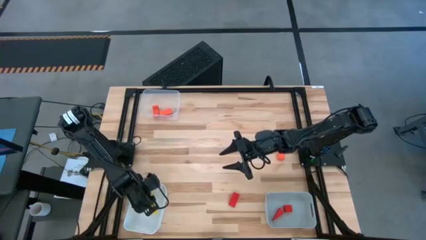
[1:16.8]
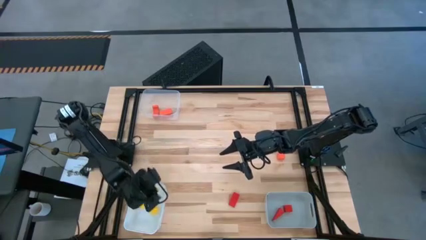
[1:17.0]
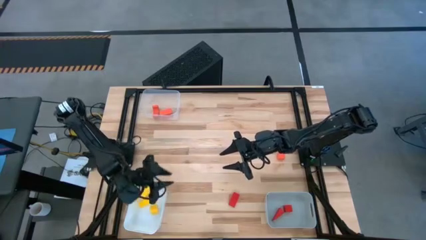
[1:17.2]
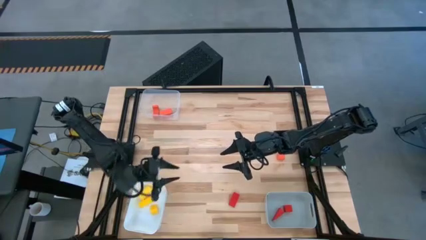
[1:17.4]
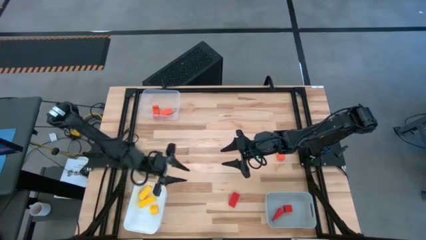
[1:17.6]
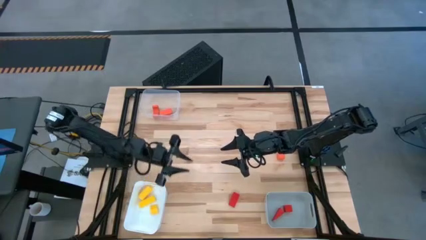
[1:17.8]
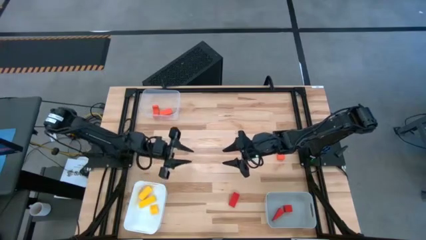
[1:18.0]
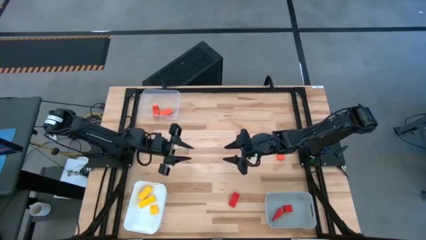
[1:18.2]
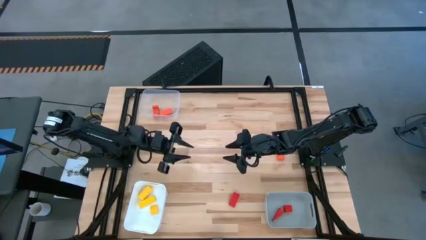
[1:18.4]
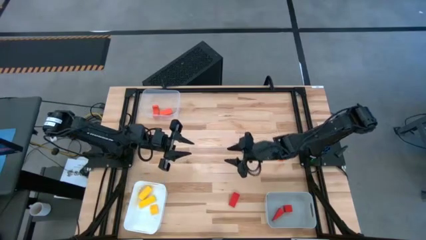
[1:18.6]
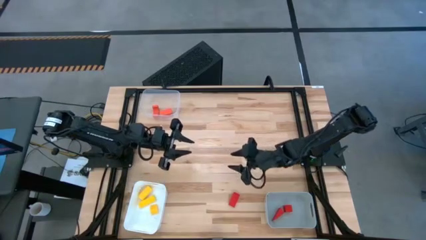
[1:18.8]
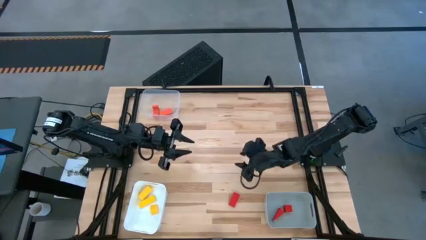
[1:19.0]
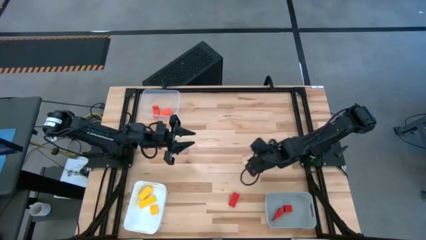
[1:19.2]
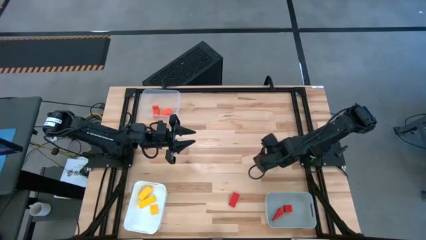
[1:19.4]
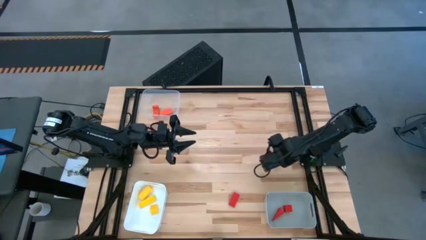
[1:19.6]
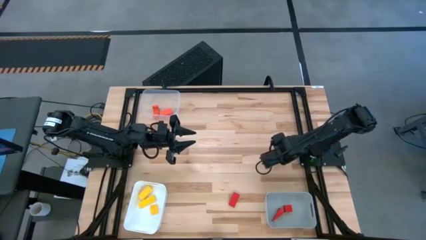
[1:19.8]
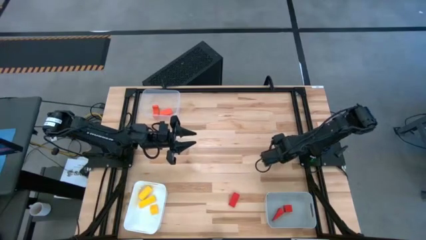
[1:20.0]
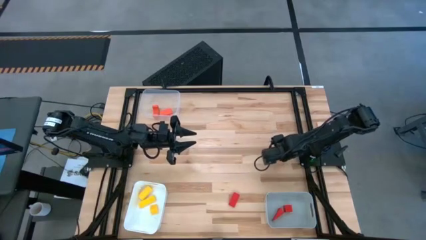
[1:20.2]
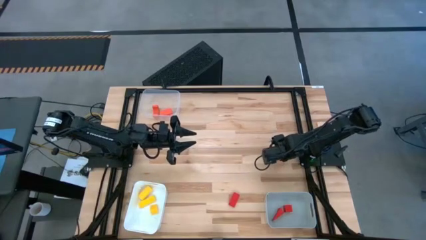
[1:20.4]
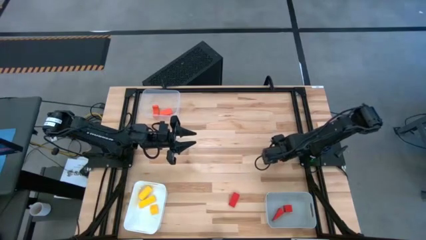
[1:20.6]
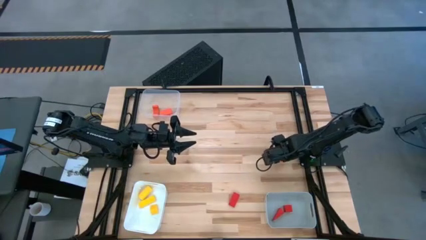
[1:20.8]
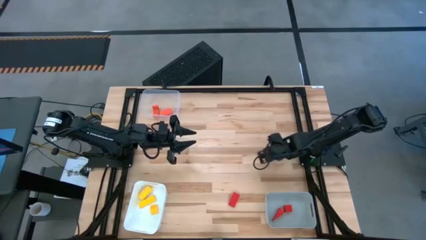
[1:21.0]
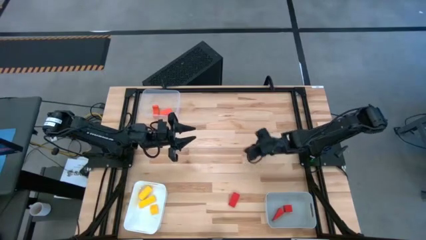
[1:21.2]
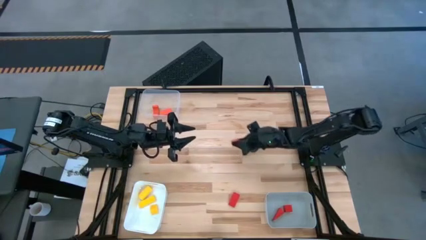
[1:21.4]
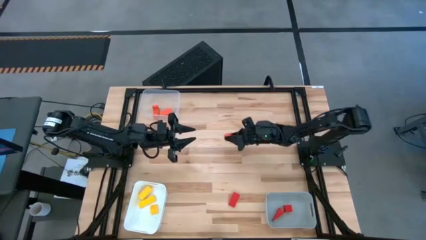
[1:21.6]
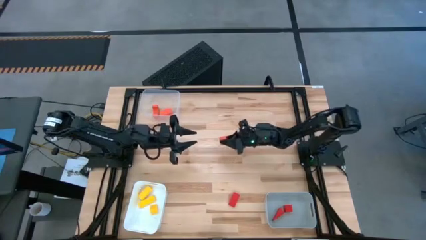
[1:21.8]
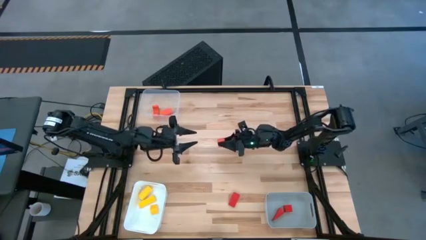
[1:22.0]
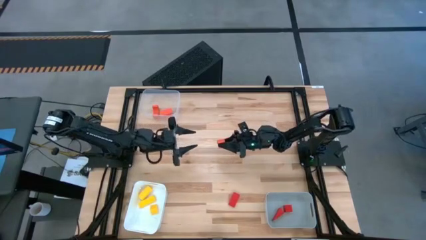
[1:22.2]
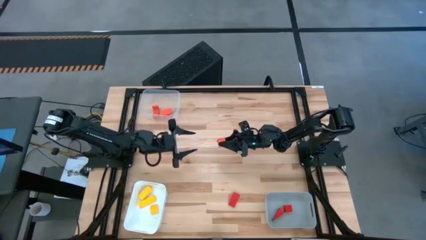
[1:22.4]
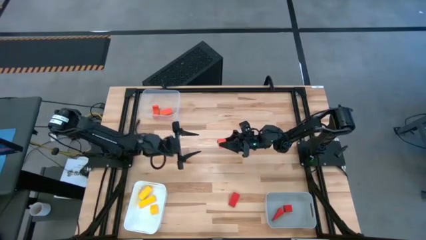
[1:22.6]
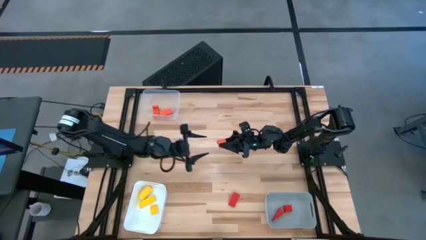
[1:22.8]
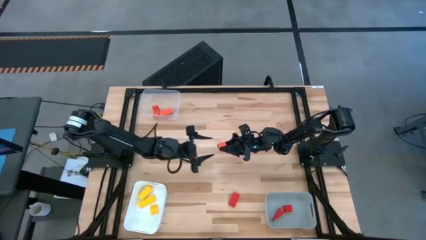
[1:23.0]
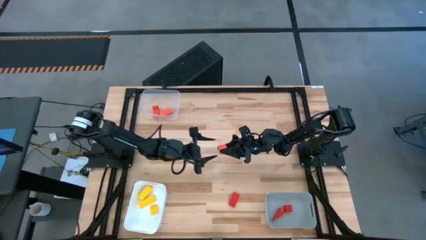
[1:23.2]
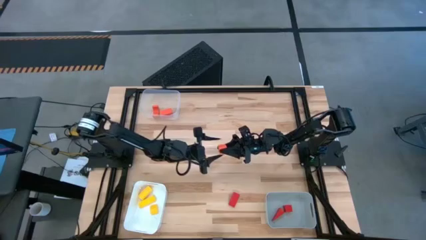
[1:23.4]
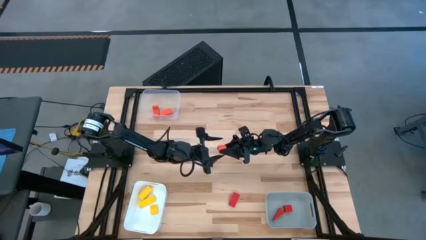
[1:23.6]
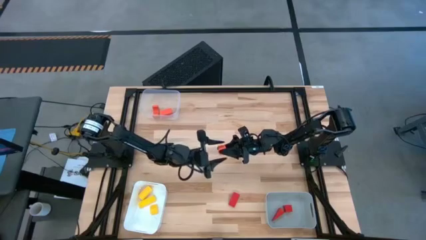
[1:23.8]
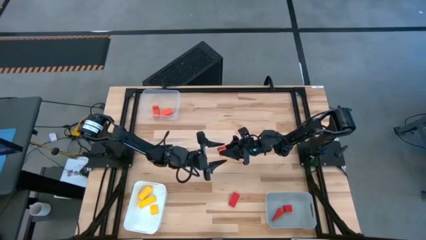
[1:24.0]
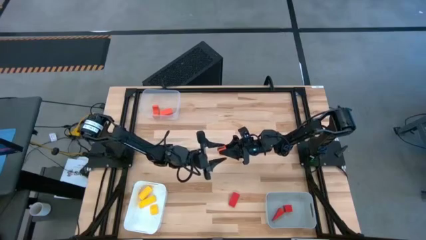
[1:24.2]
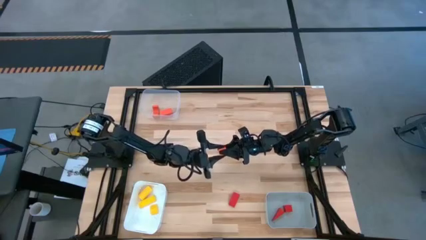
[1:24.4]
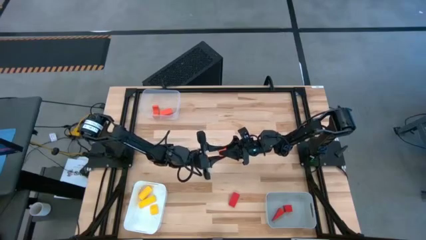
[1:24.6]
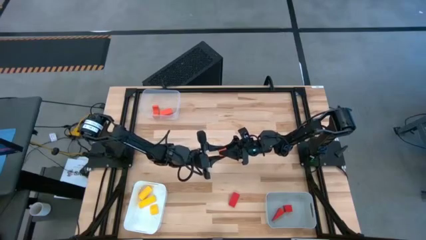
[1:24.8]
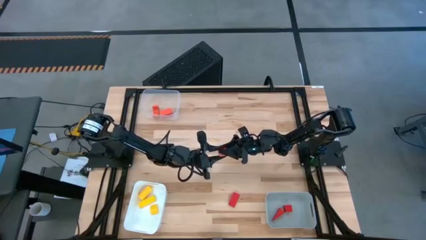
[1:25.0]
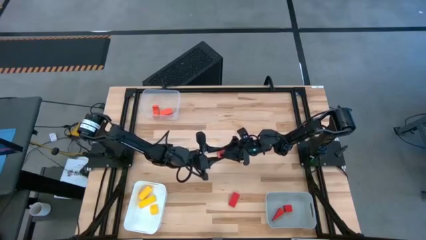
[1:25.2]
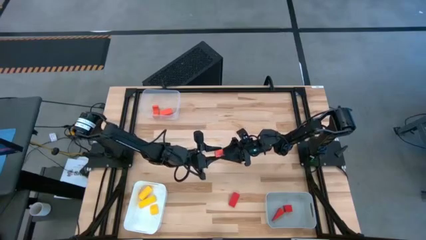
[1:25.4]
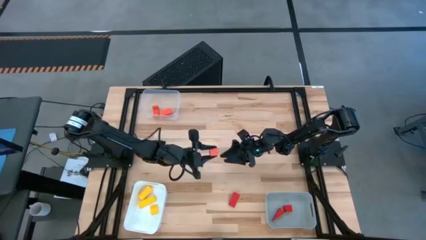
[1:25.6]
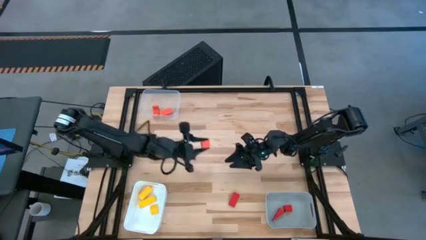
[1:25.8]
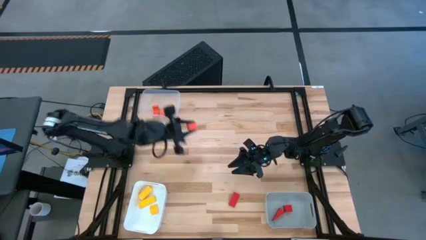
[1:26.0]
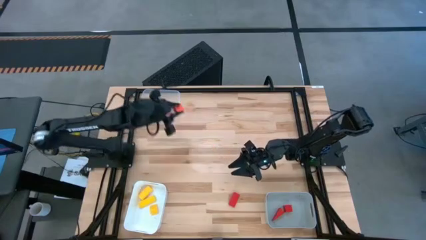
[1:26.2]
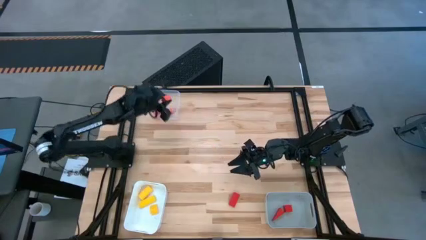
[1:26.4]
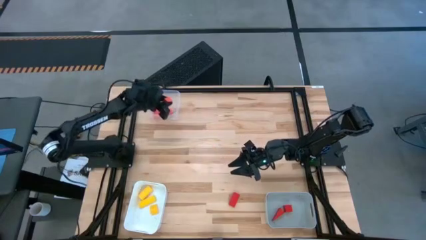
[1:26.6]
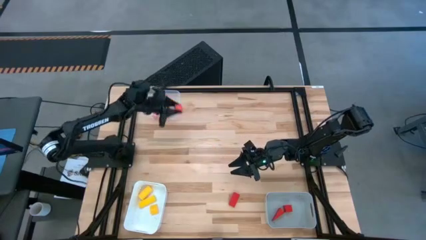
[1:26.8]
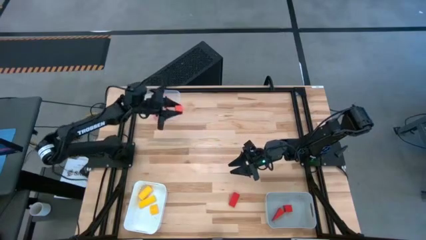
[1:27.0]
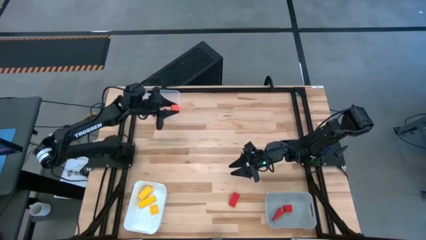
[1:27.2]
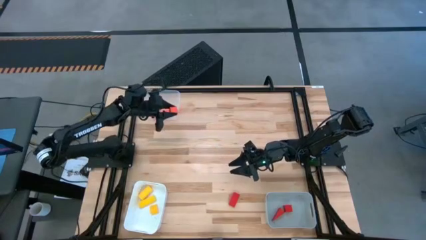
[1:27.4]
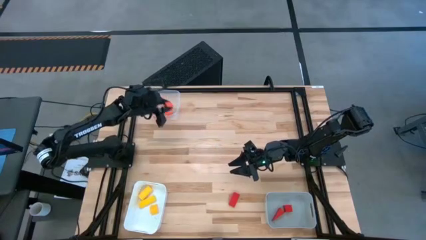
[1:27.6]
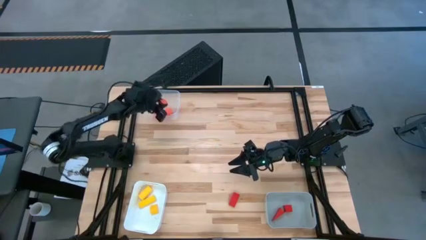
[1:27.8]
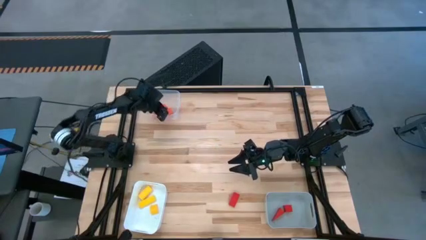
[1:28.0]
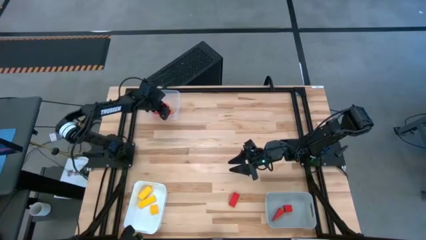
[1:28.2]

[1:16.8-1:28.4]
Task: Sort & place blocks by color
Put the orange block into the transparent bin

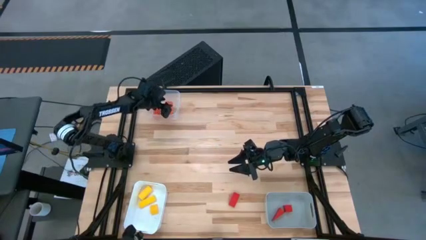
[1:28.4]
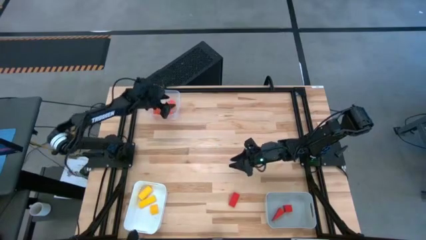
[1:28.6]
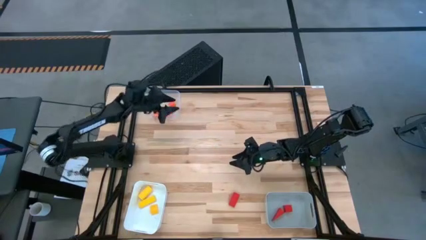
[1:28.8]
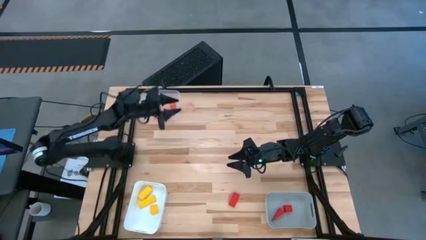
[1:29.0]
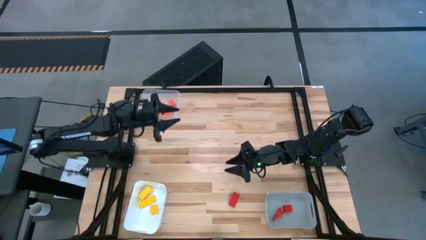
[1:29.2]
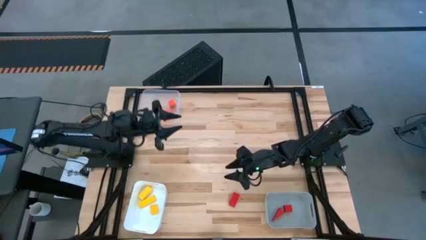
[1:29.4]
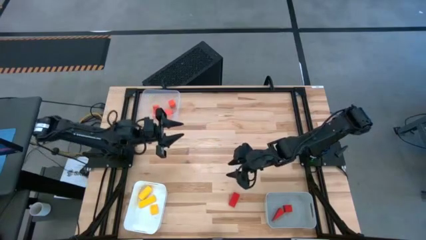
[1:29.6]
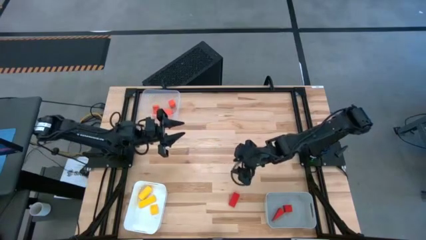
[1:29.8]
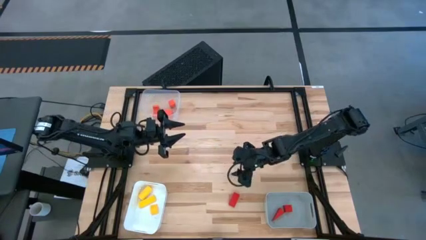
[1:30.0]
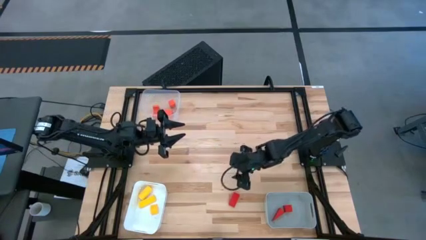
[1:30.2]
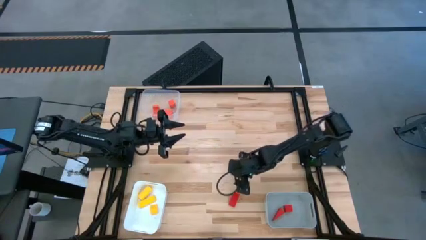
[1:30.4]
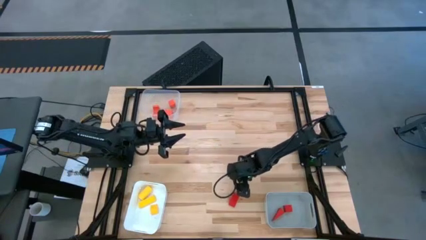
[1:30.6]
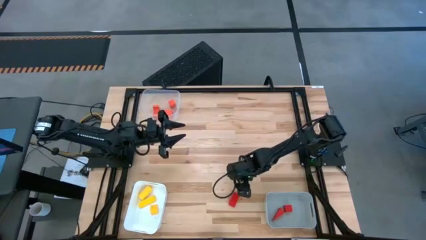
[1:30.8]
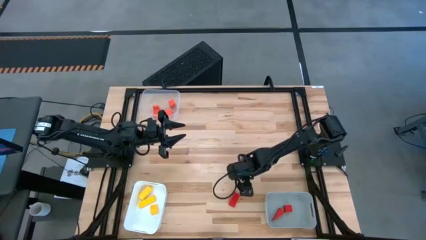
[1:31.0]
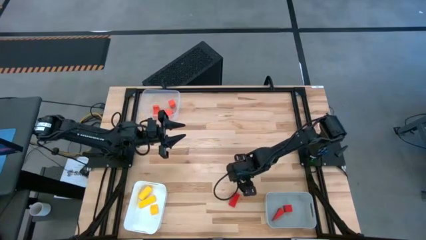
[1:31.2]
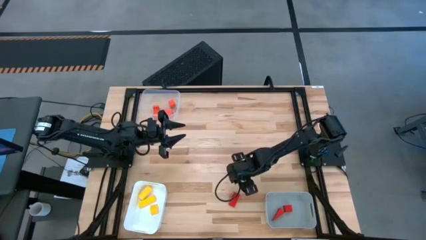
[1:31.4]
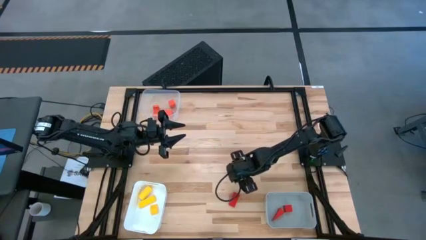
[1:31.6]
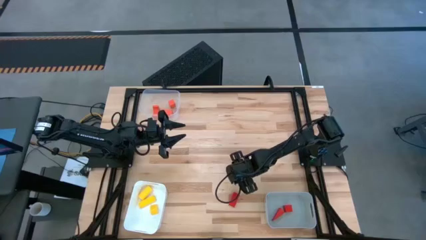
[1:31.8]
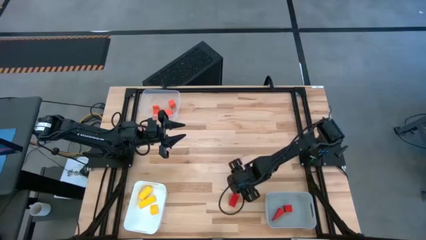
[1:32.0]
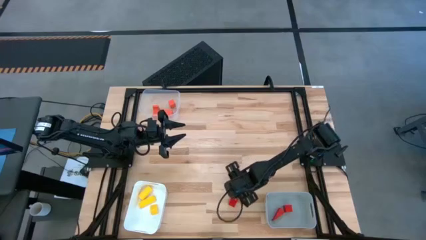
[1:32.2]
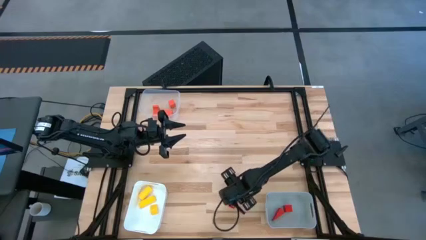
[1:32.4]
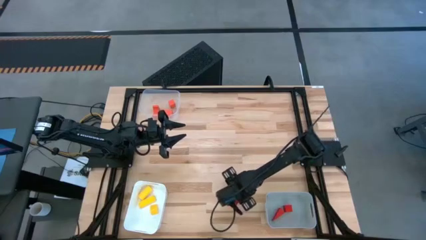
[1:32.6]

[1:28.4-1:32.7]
Put the red block into the gray bin
